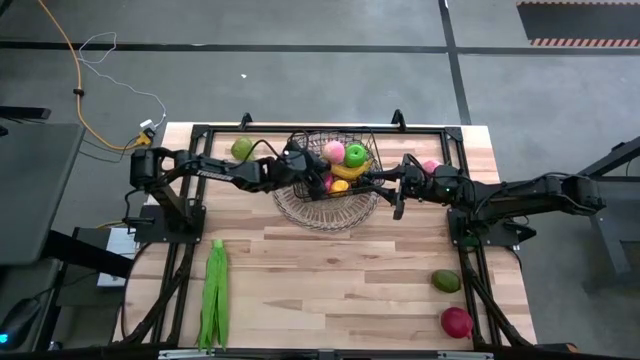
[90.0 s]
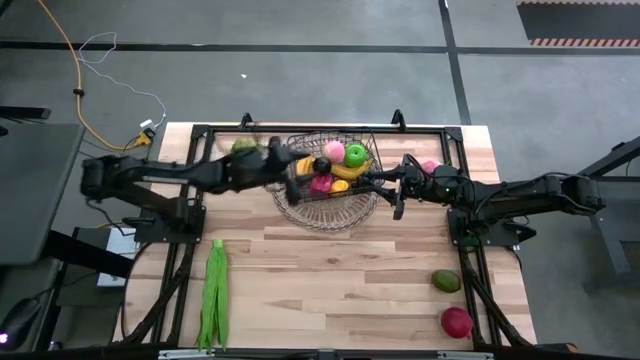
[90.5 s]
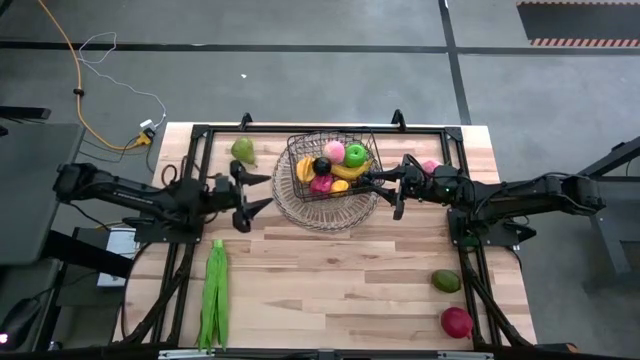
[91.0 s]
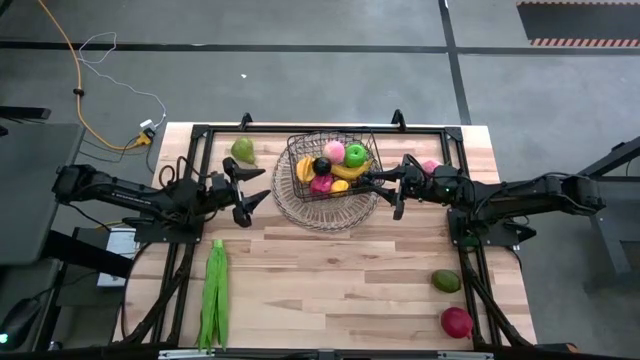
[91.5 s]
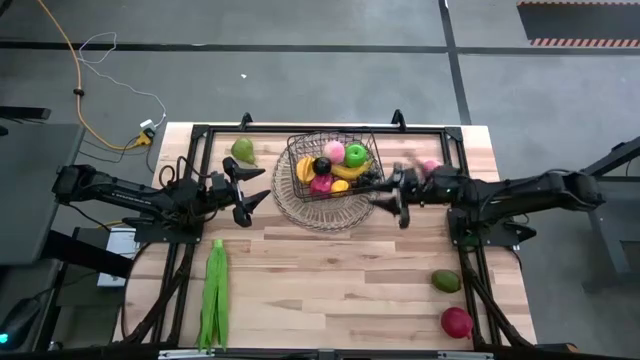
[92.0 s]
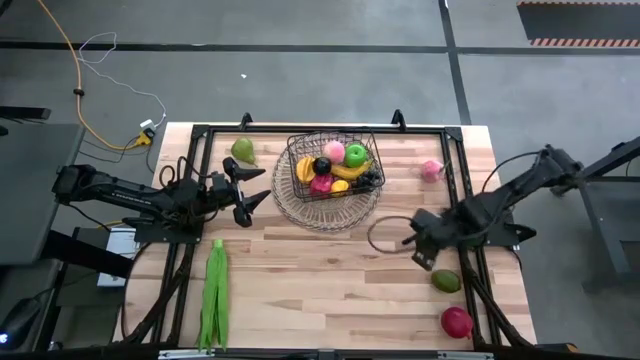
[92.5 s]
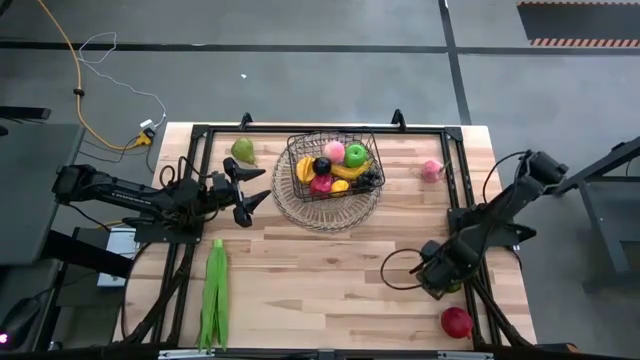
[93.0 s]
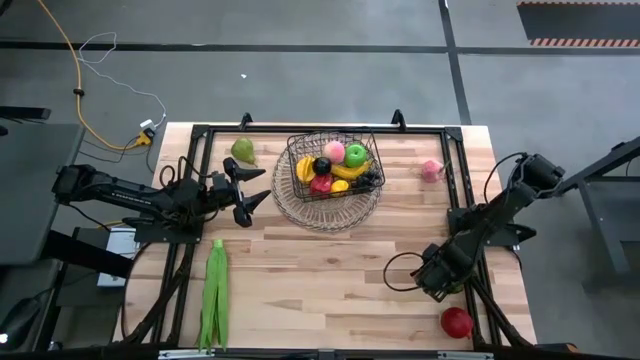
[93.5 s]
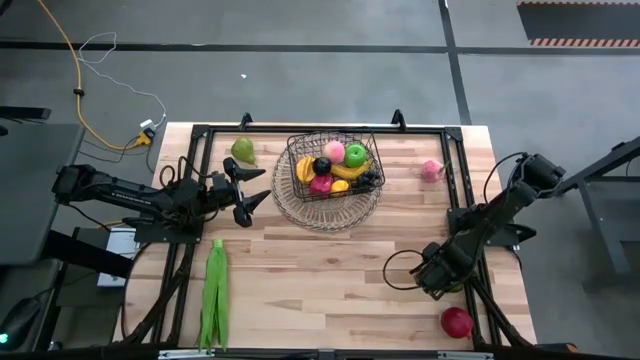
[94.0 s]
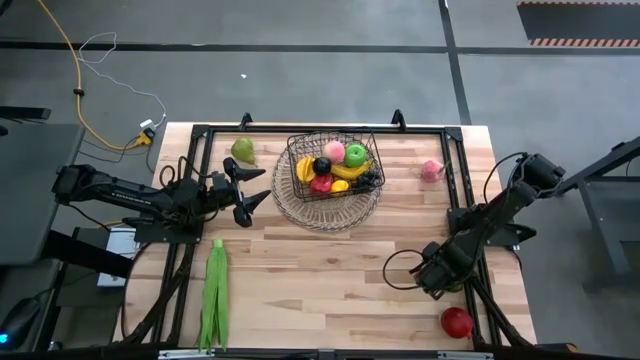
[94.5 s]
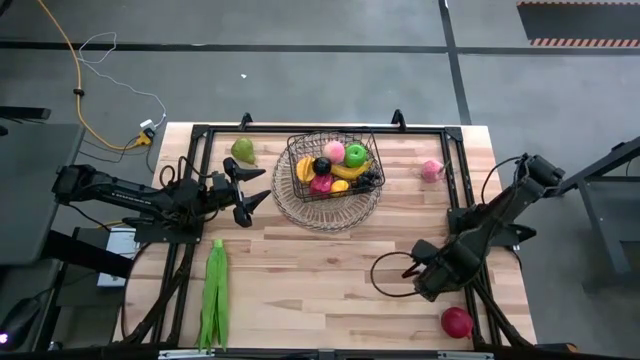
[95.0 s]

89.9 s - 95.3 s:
Task: Build produce basket
Put the green lime into the wire basket

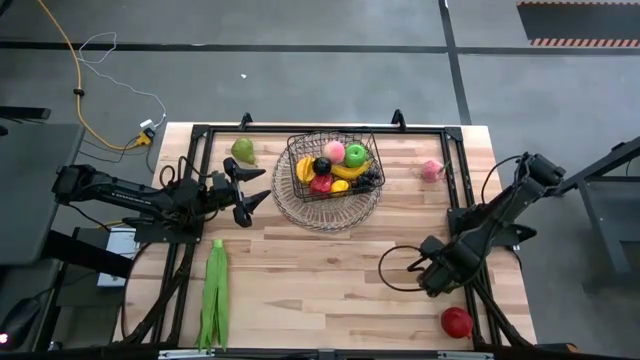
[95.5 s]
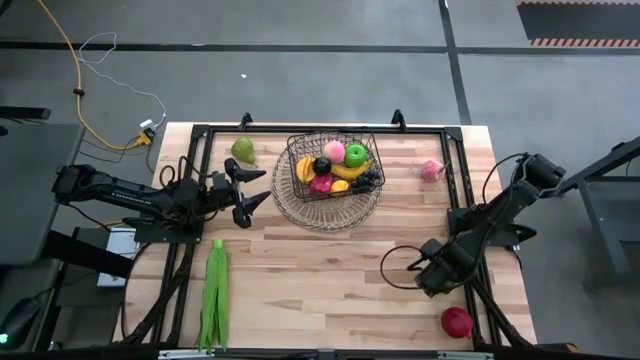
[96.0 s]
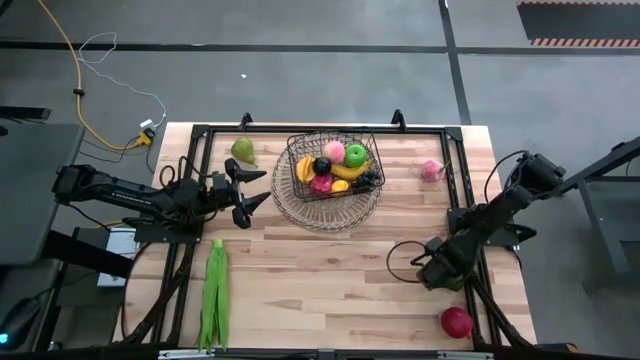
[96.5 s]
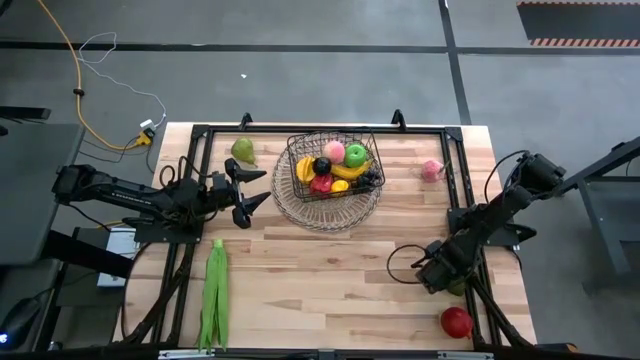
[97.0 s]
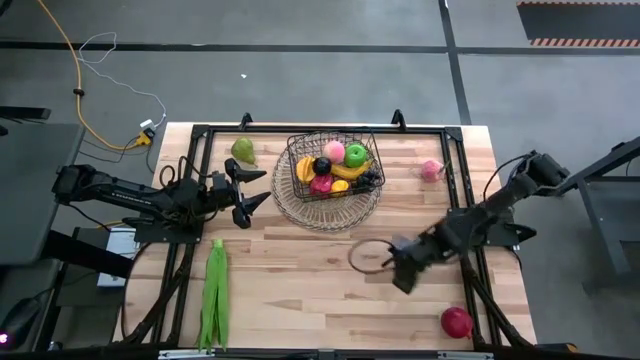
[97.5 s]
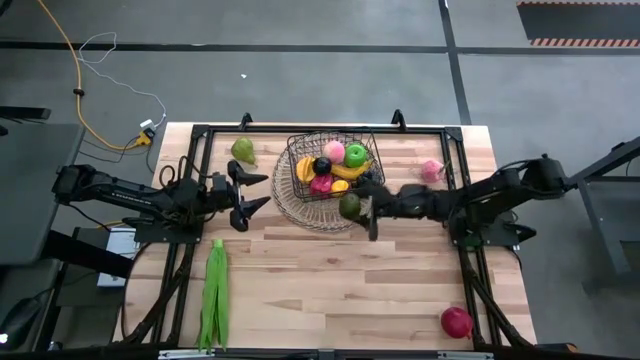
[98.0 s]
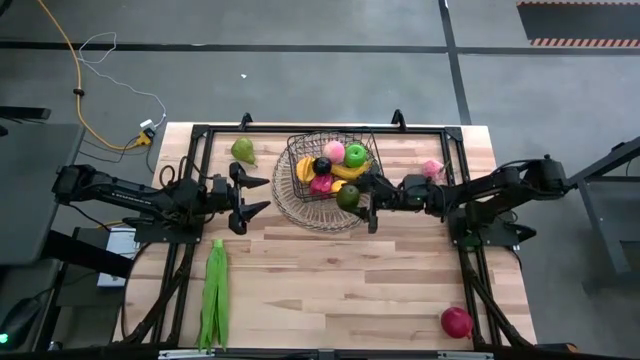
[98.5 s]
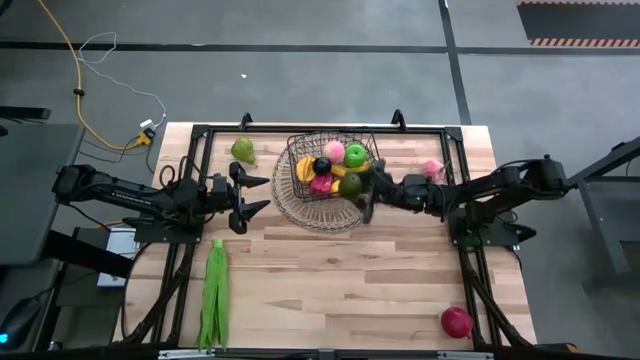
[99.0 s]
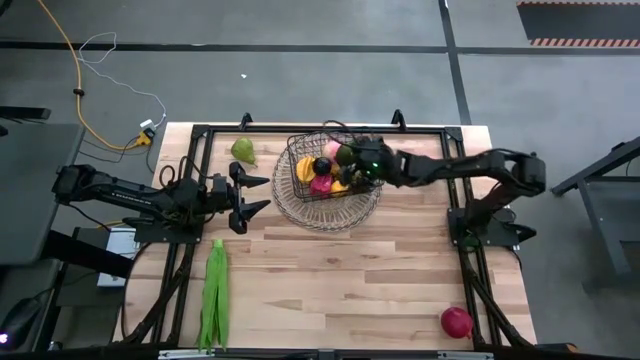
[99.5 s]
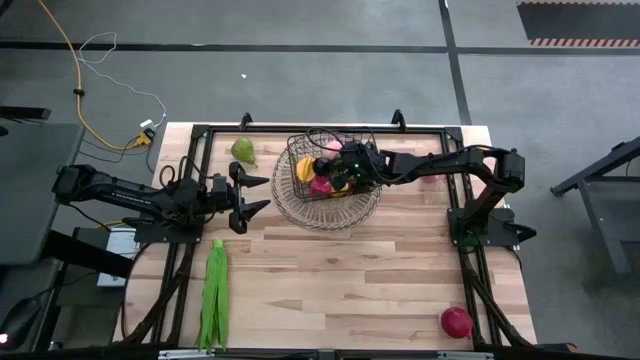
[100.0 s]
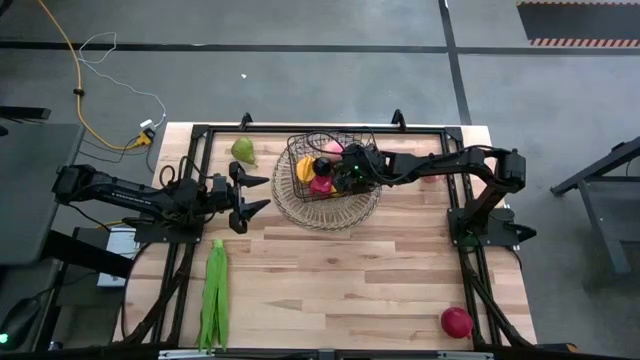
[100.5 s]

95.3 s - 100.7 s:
Put the lime into the wire basket

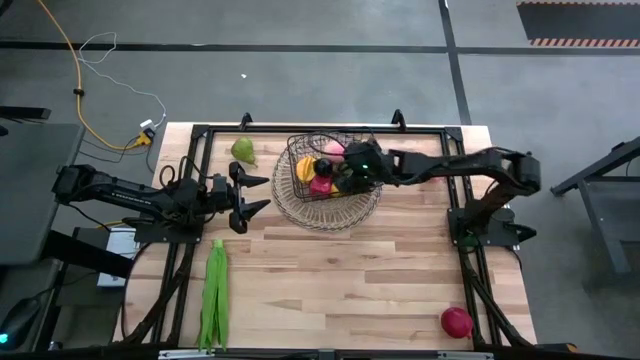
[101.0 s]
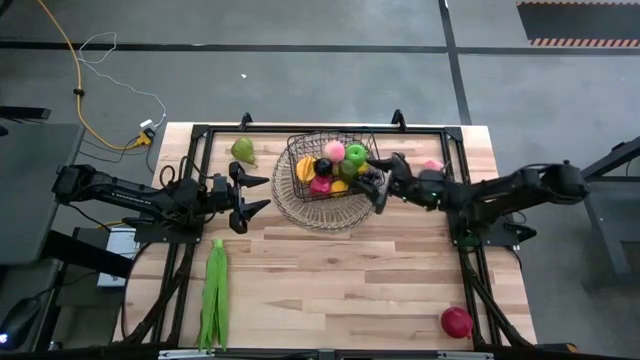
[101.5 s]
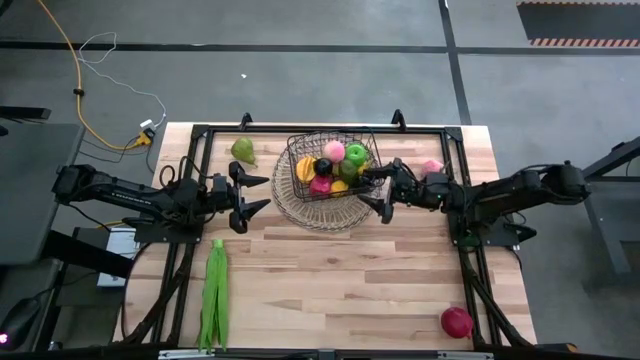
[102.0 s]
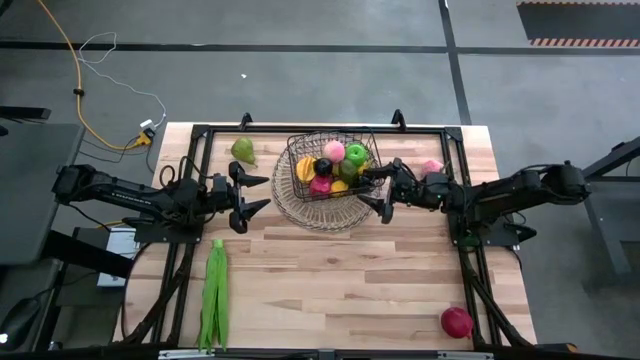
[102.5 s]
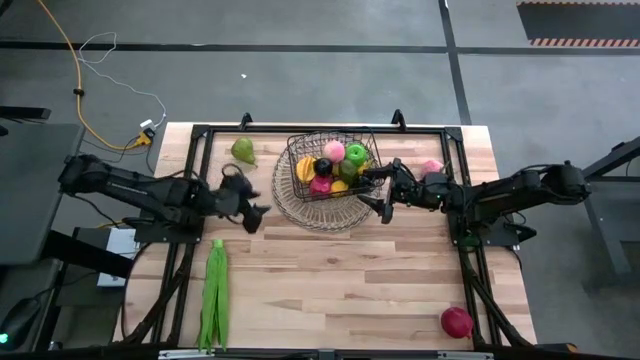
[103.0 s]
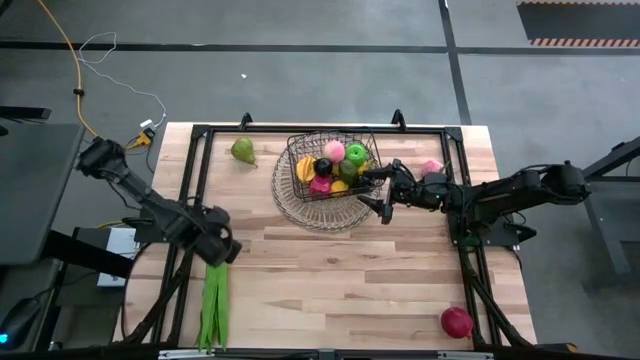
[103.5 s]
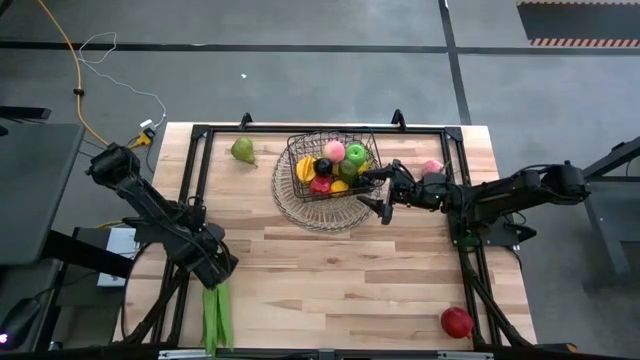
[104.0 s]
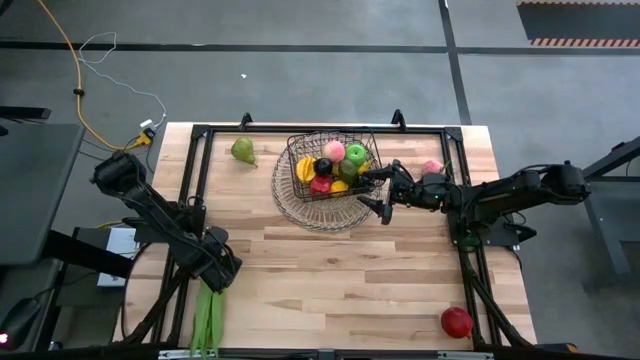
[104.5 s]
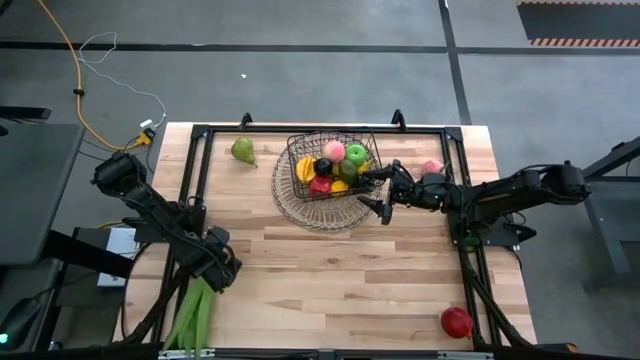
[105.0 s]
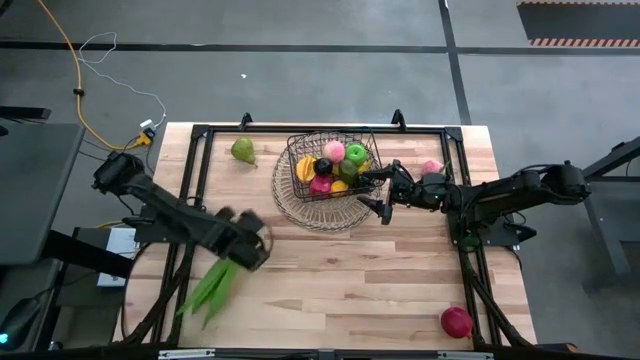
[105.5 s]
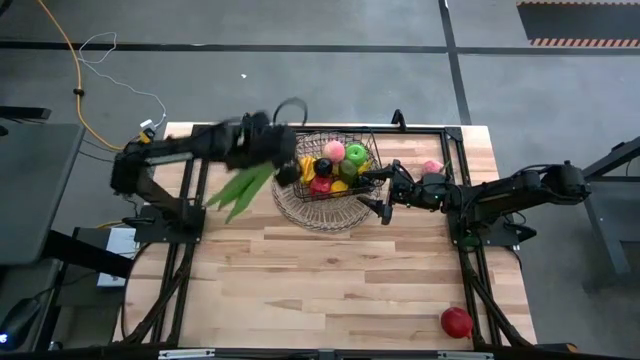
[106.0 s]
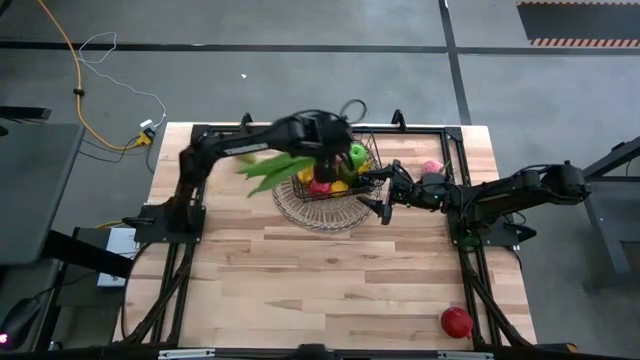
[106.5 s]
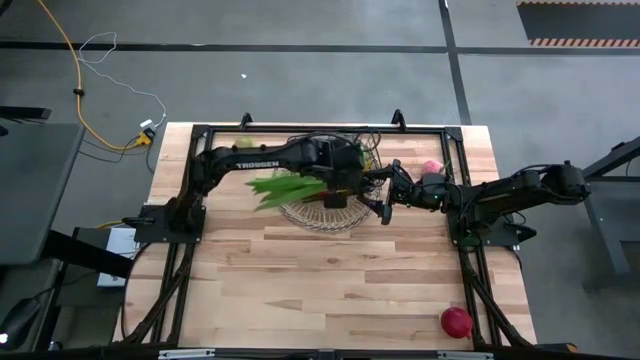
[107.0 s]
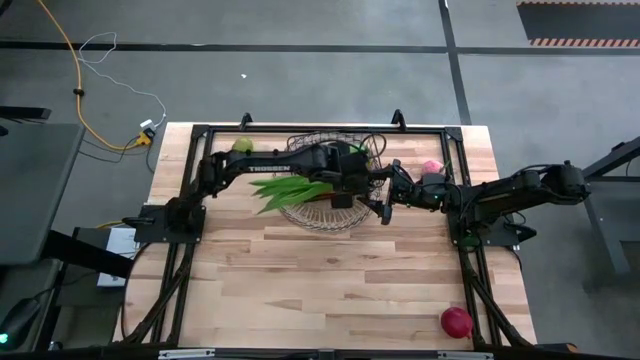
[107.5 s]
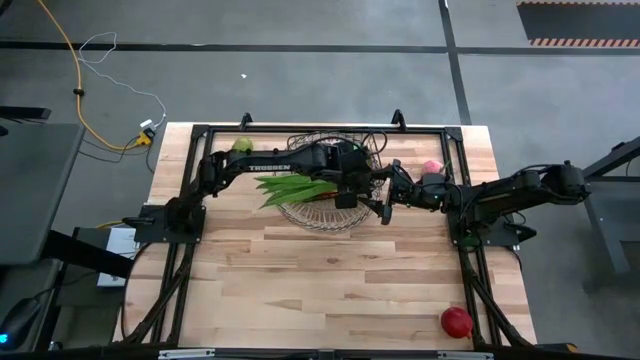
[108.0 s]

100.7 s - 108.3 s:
Put the leaf lettuce into the wire basket

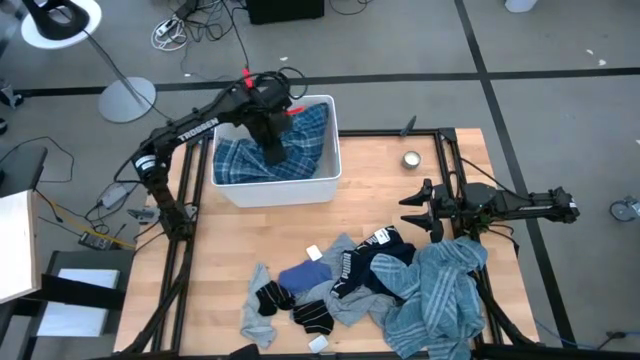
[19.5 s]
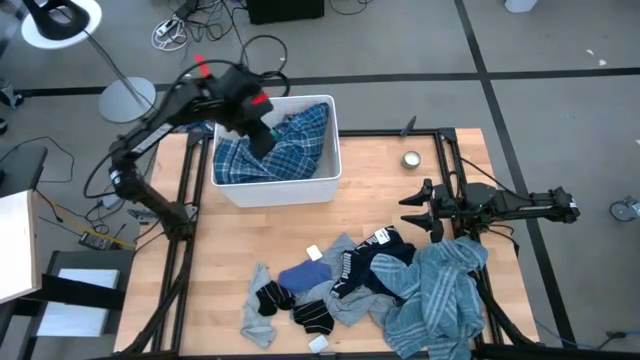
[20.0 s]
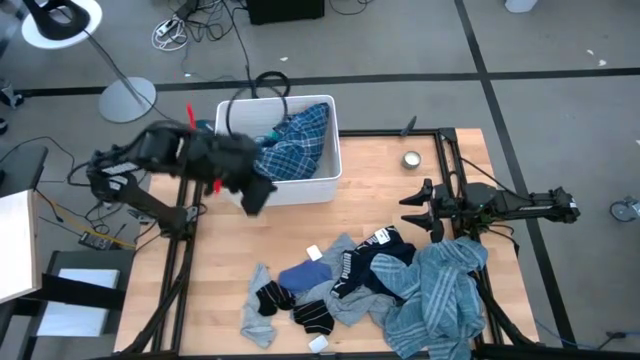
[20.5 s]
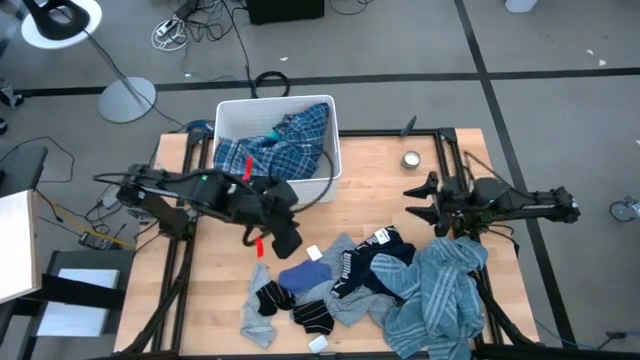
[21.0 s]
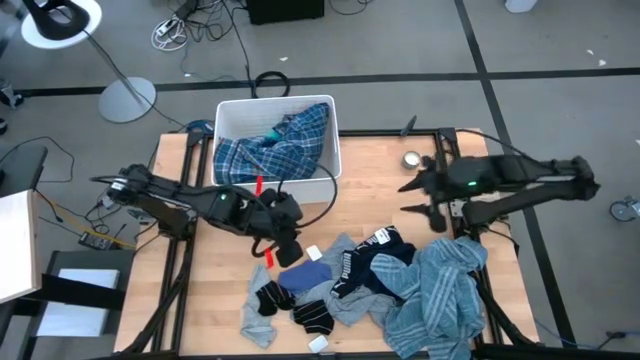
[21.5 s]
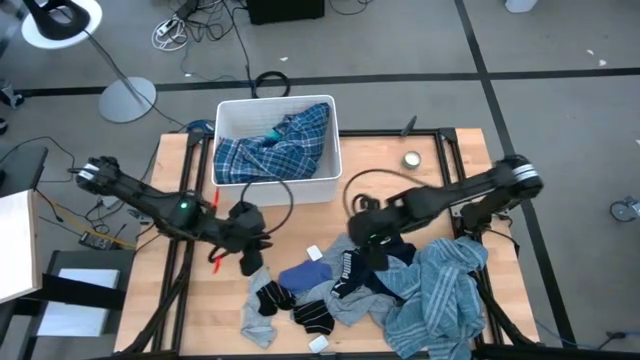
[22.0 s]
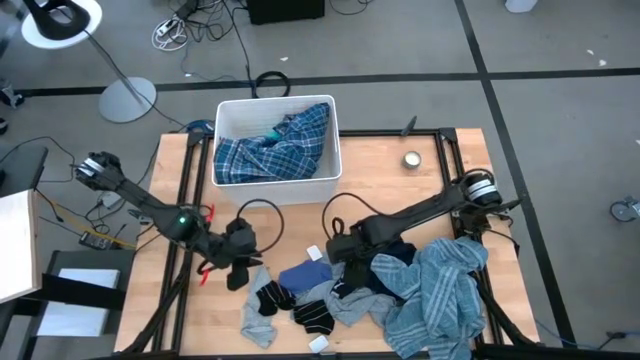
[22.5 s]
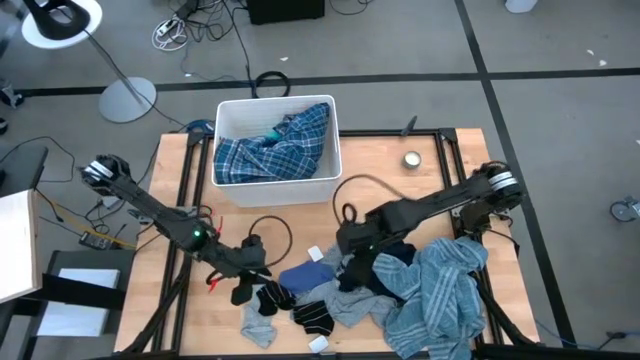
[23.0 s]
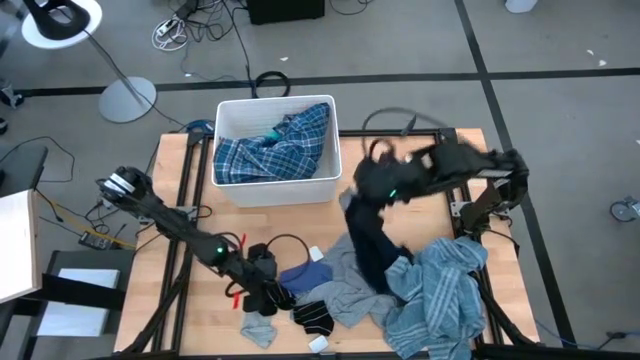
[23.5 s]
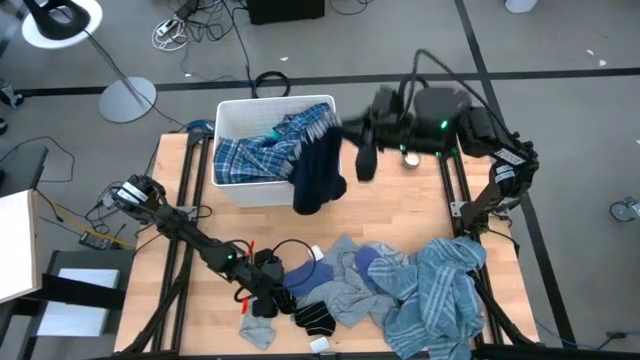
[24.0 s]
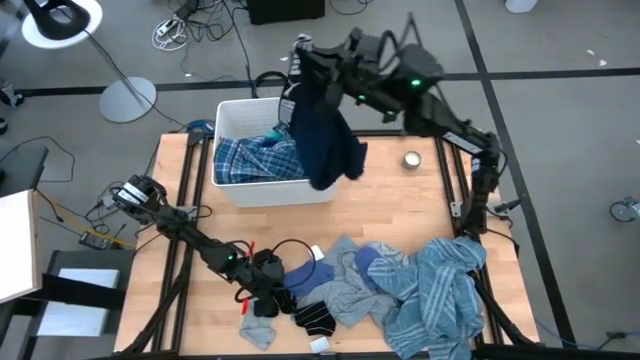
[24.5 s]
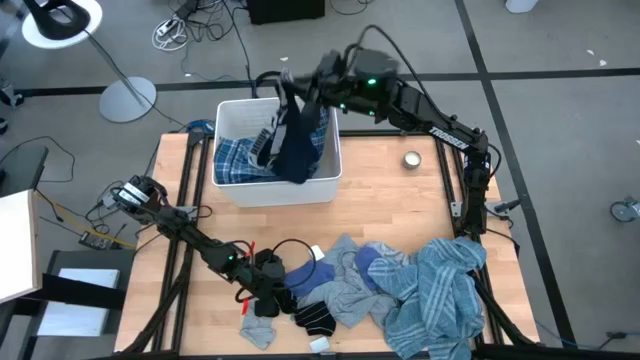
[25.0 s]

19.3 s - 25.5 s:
Task: Sort clothes
Put the black underwear into the white laundry bin
